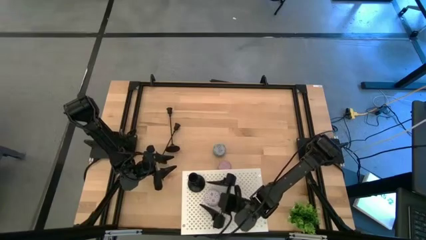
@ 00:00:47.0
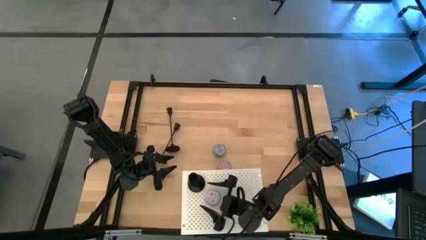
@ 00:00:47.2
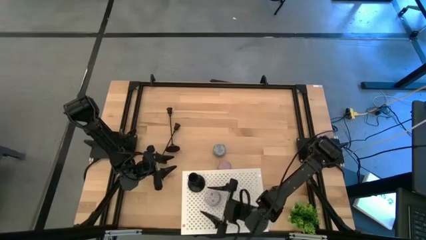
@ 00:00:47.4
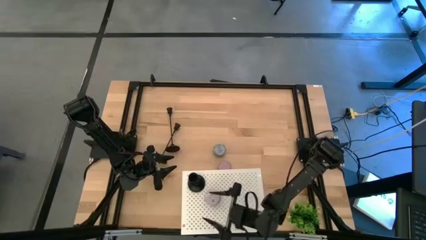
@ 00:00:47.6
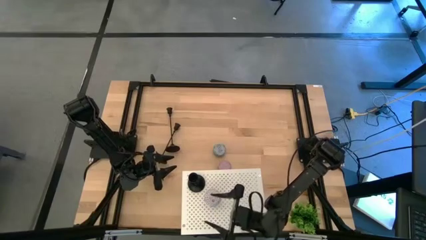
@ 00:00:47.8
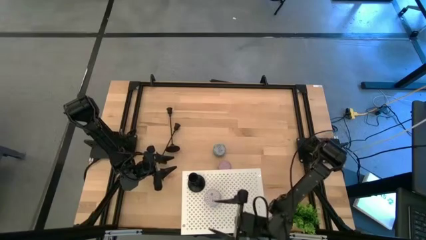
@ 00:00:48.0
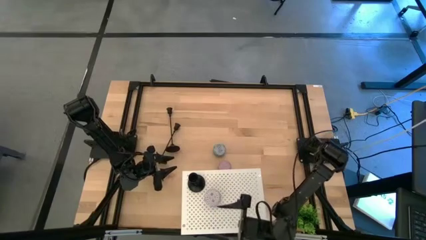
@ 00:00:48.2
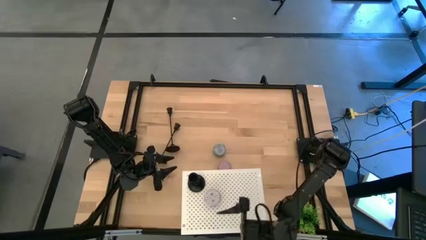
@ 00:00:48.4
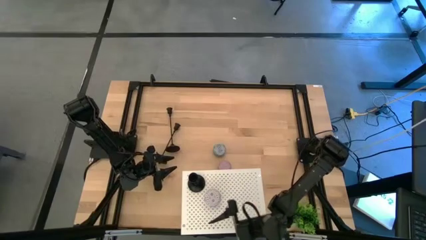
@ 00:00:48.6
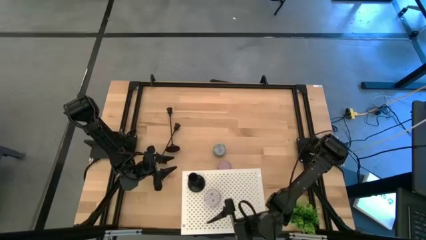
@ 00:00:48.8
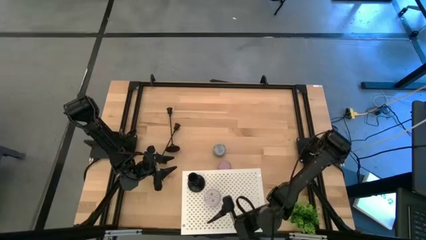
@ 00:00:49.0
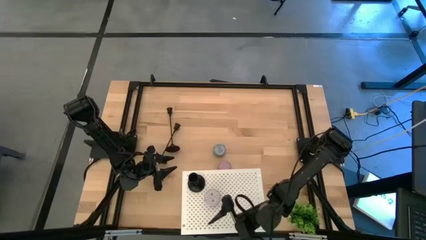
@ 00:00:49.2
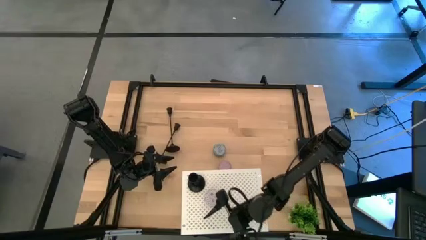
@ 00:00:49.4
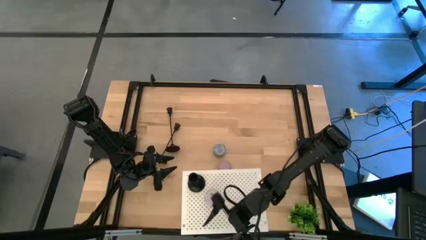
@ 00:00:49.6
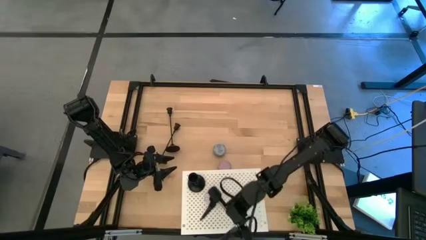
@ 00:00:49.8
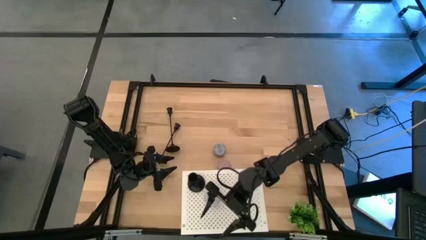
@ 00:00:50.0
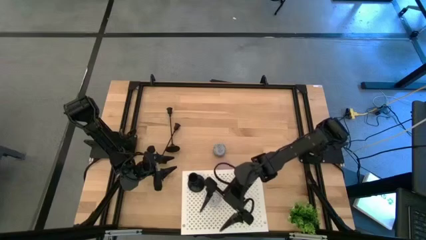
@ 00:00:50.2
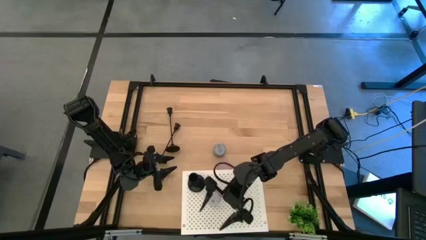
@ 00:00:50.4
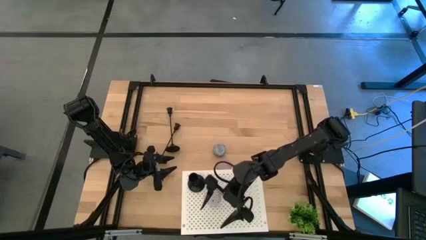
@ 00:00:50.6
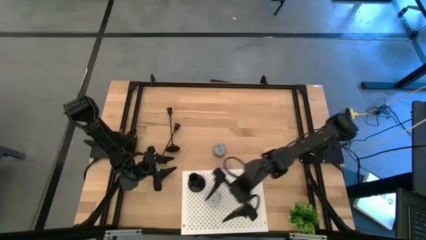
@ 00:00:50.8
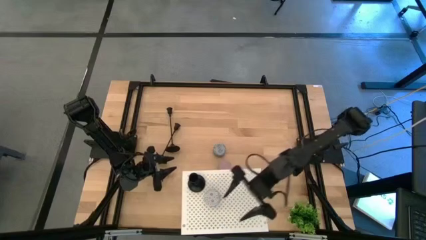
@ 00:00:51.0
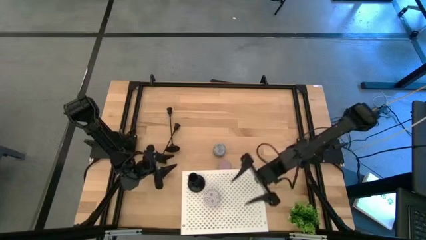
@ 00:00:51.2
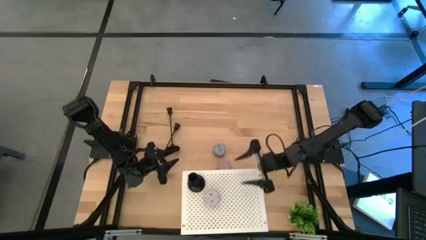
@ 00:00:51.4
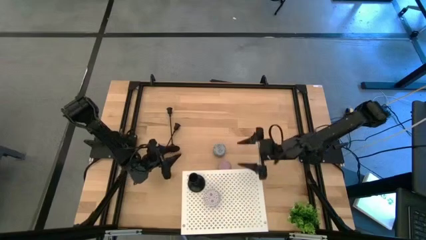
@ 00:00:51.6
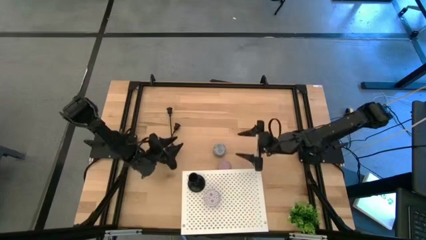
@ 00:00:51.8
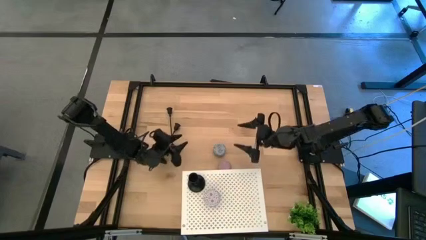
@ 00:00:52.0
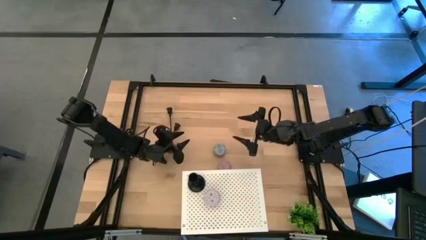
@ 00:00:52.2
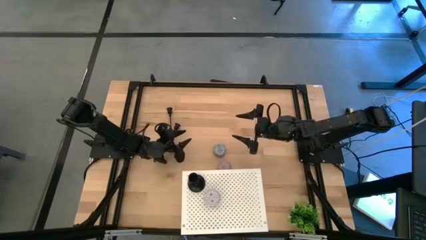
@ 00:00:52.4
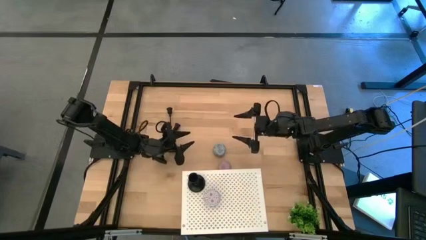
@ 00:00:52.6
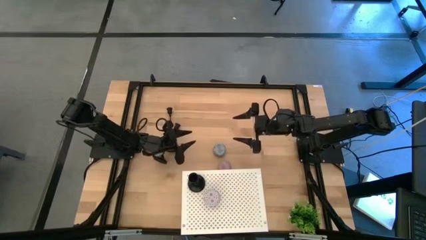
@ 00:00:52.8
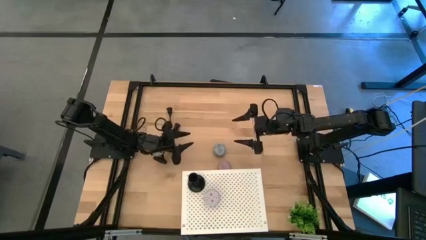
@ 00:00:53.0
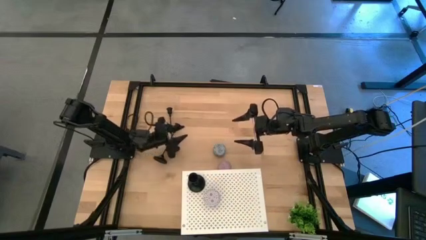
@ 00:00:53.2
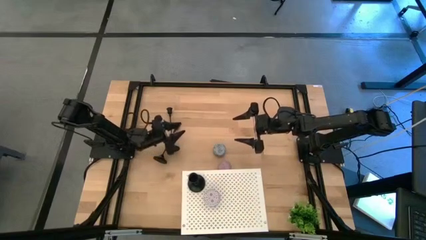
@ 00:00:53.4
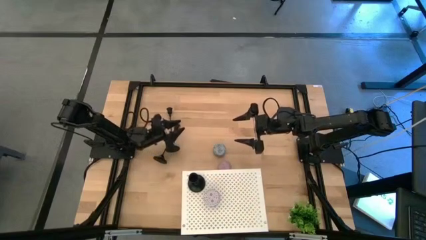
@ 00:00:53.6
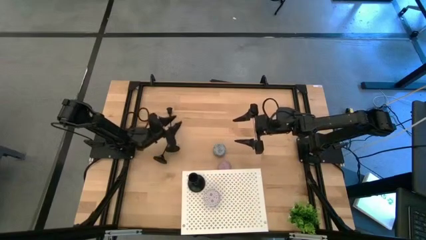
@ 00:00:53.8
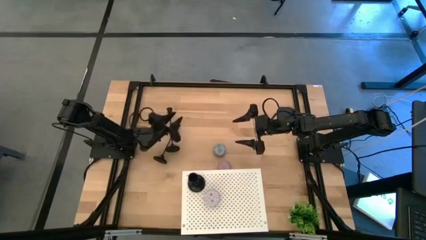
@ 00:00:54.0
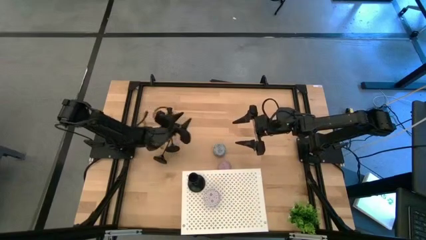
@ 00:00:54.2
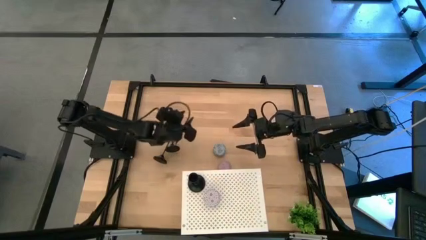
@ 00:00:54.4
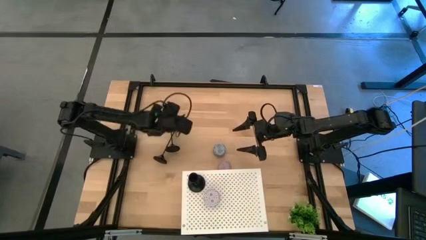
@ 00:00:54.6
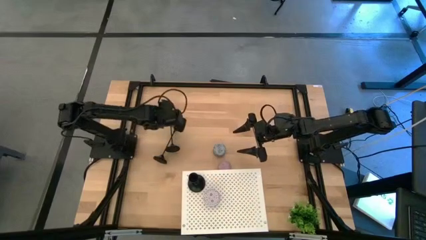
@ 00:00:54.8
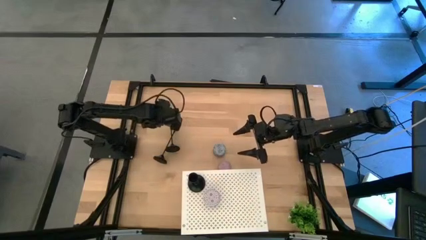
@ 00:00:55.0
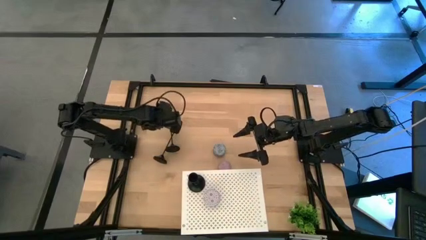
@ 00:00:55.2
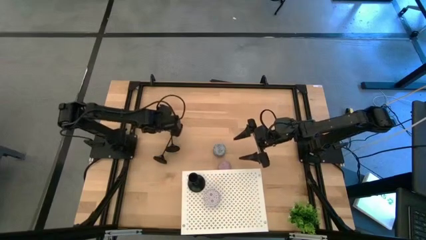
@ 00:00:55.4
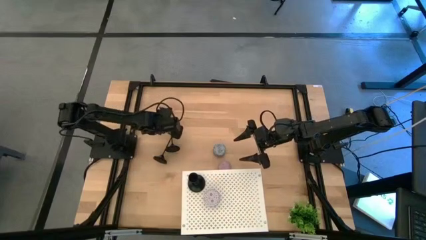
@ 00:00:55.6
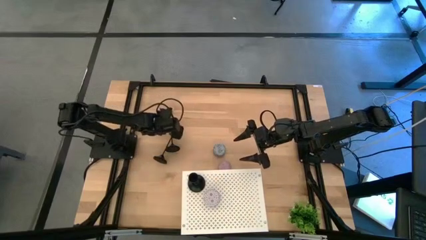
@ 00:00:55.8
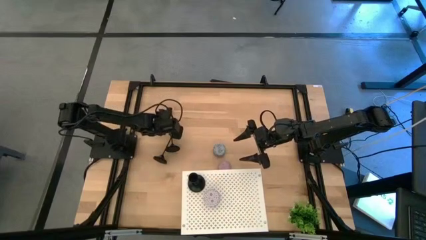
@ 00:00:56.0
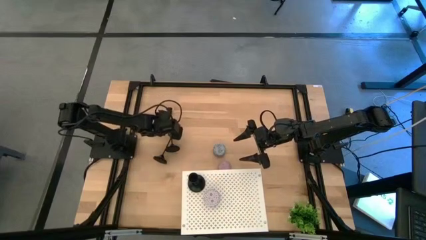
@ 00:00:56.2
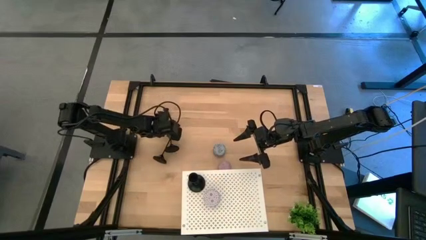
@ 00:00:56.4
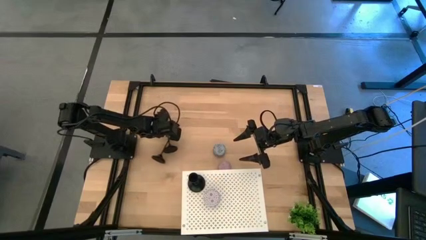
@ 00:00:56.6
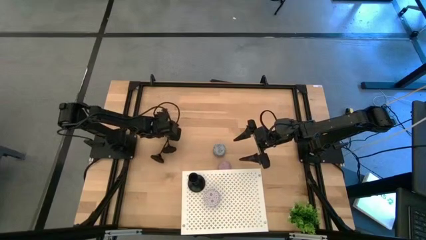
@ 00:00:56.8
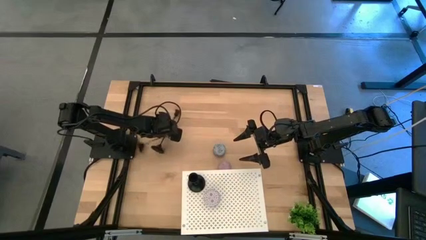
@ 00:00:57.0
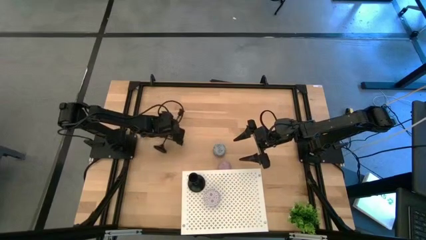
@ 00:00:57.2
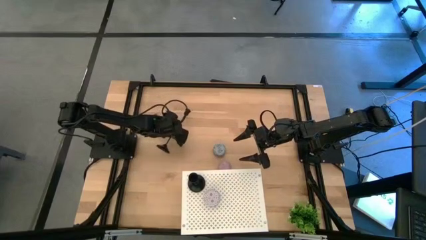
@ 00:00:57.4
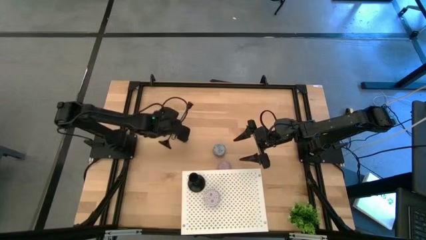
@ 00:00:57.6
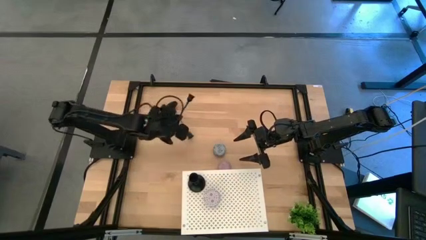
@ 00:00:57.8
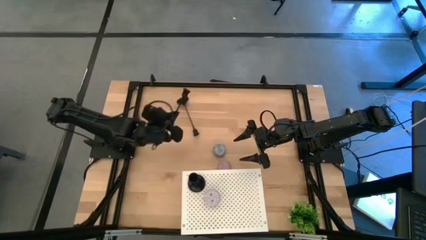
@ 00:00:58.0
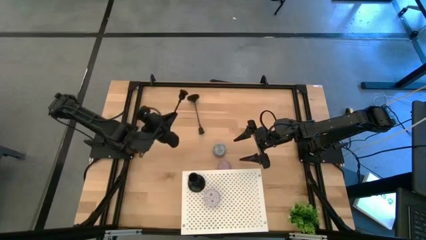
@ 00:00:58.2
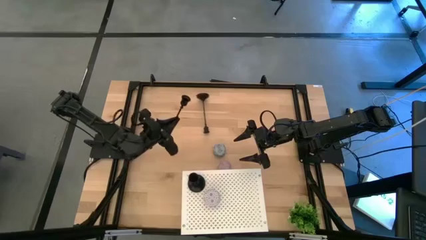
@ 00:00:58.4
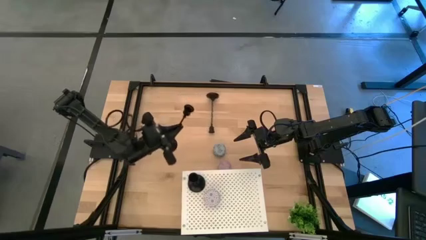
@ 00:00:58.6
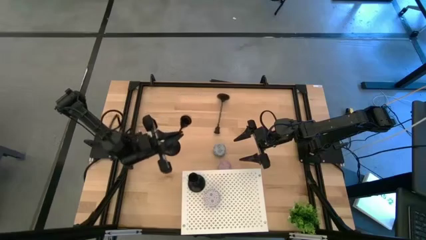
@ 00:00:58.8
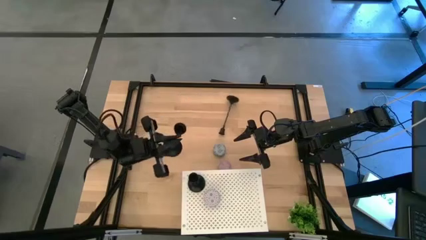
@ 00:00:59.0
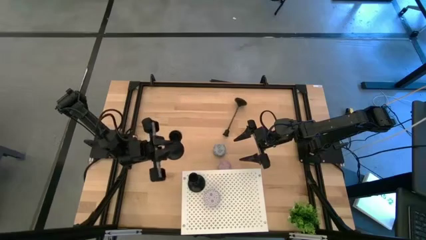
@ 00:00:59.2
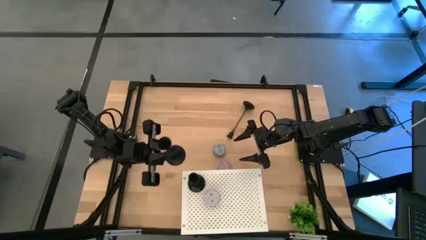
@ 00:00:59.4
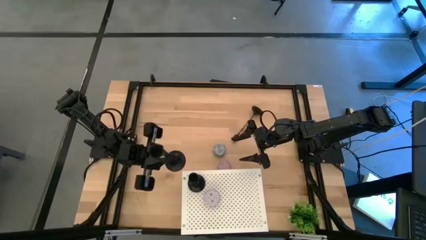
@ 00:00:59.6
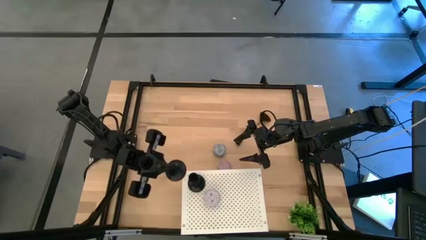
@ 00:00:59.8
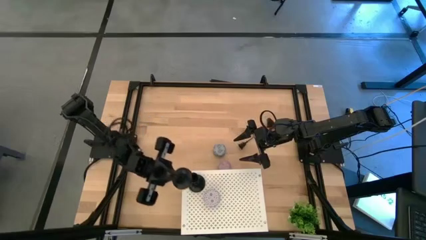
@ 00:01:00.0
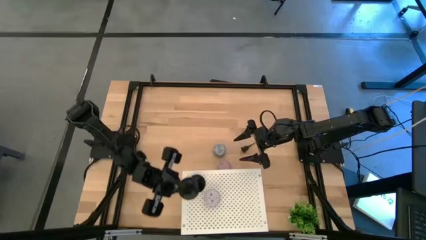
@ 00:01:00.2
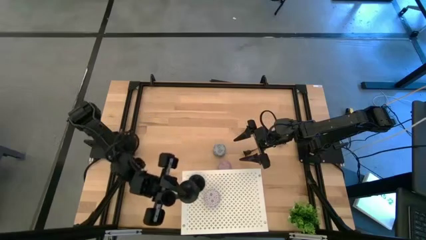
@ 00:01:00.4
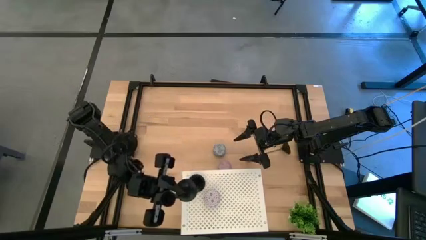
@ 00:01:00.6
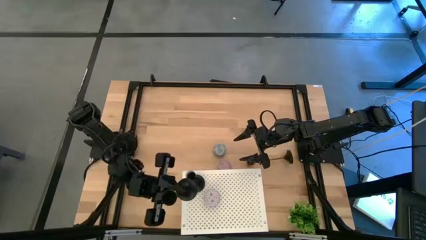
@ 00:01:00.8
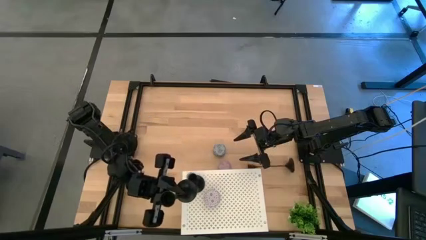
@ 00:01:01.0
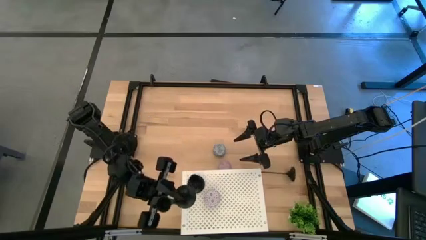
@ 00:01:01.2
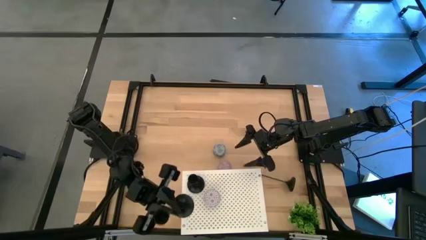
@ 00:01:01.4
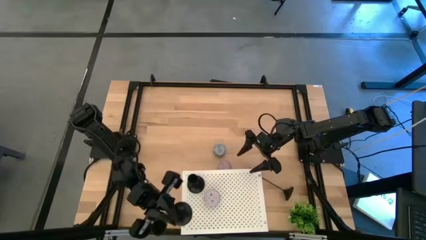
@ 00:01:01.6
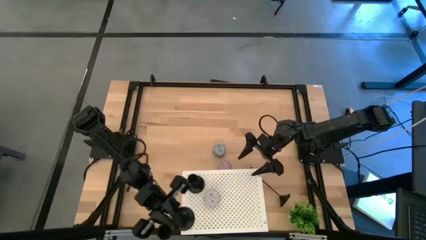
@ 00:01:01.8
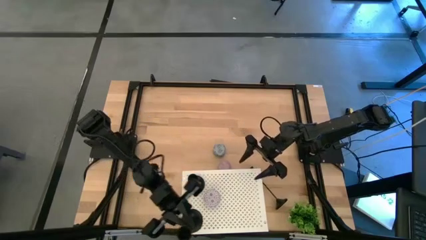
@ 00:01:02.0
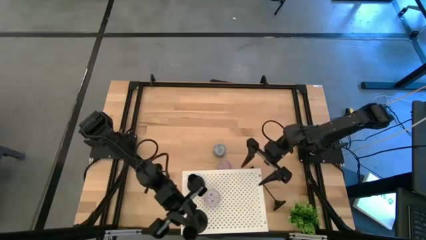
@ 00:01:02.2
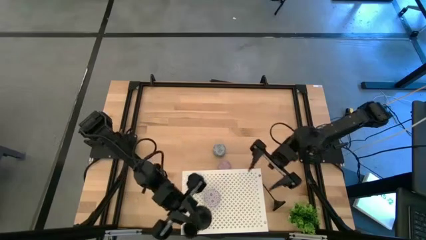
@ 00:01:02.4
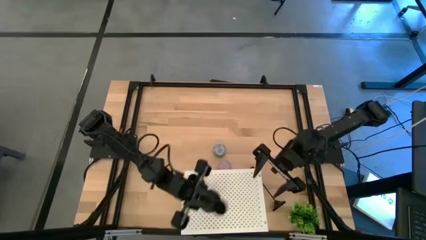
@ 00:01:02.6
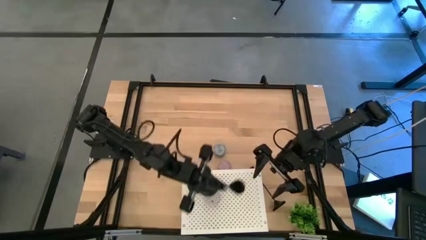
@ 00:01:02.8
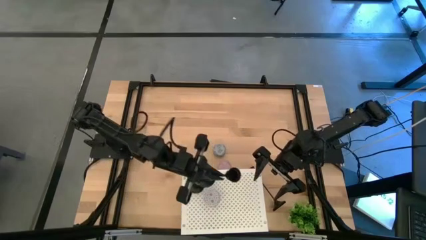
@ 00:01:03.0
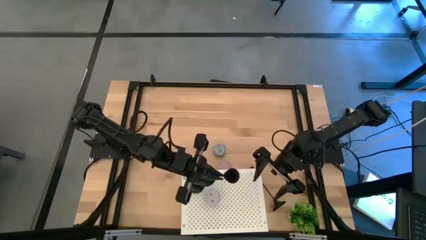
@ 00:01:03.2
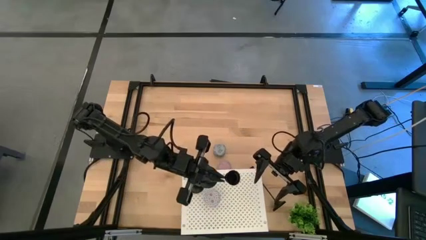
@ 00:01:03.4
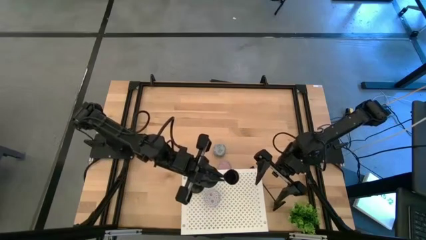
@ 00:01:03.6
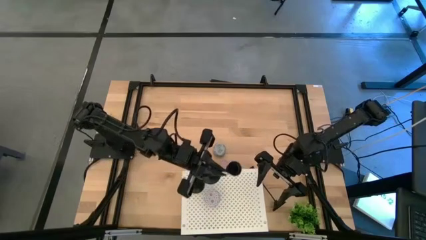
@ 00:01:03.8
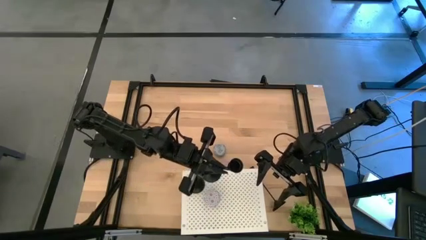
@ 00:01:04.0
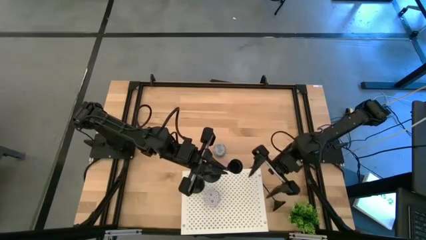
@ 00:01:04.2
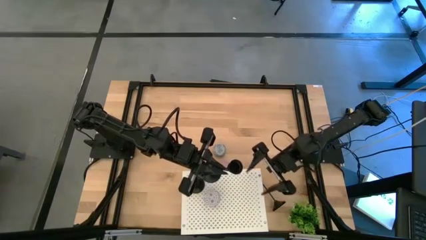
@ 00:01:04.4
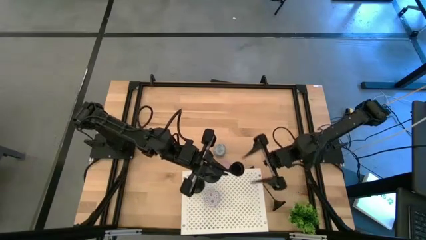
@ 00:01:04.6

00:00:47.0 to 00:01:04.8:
Task: Pick & Place candle stick holders
Put the top black candle holder on the shelf
